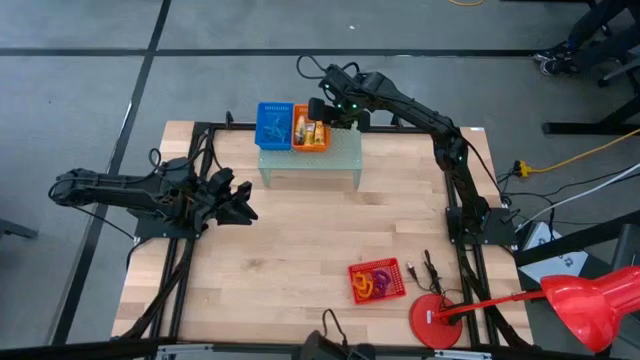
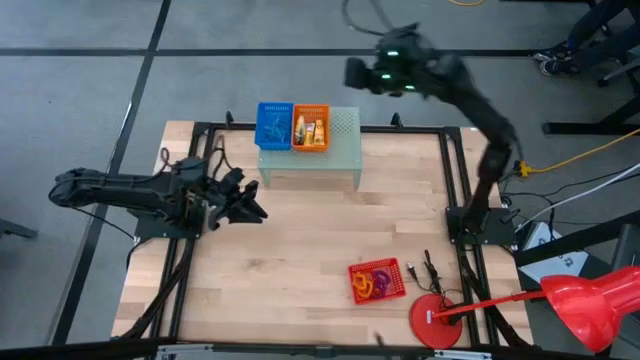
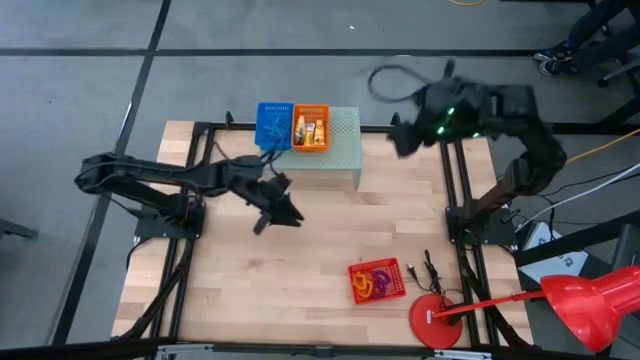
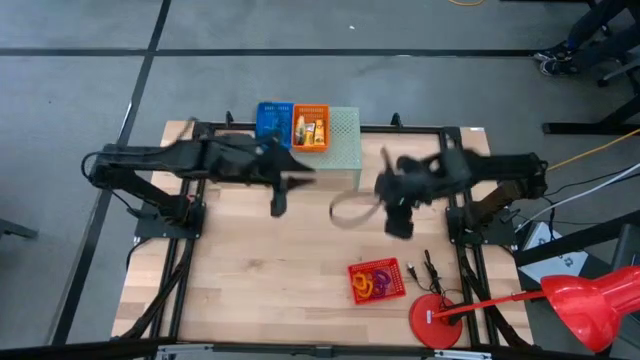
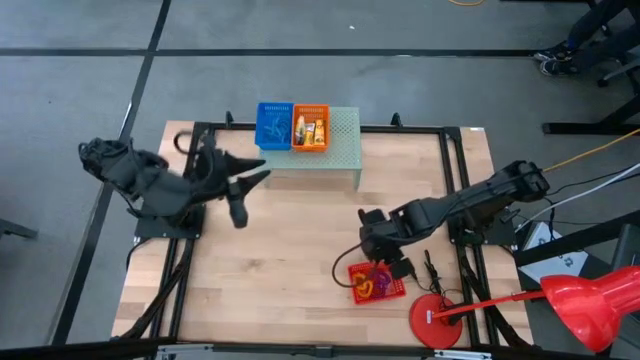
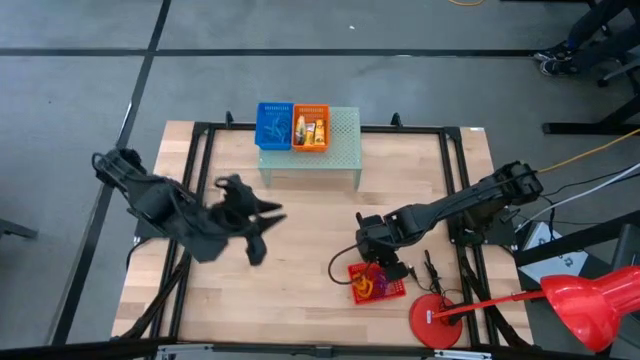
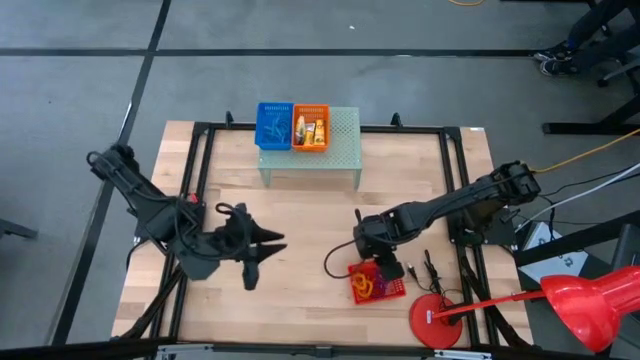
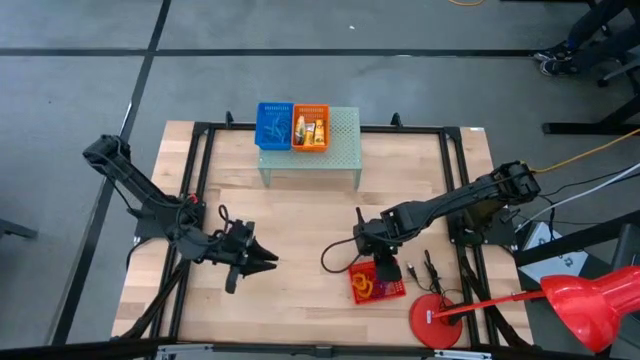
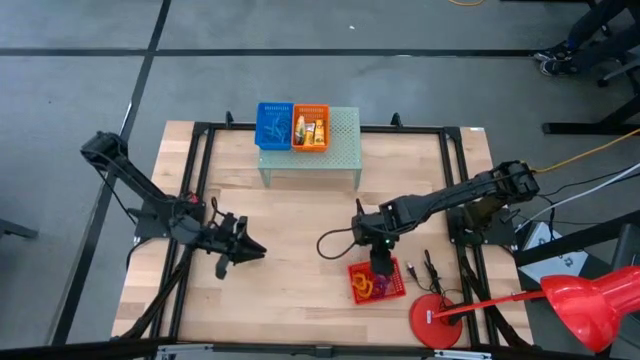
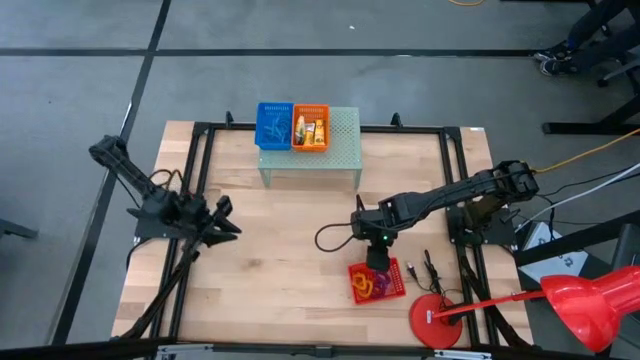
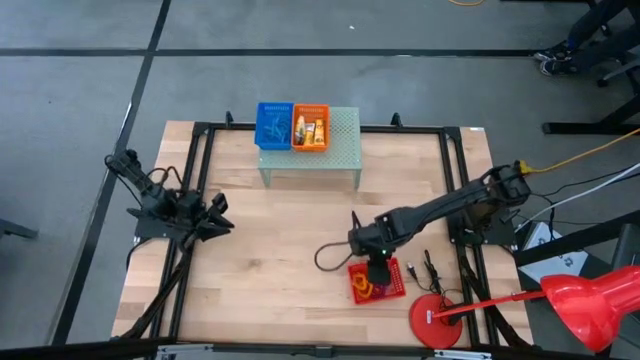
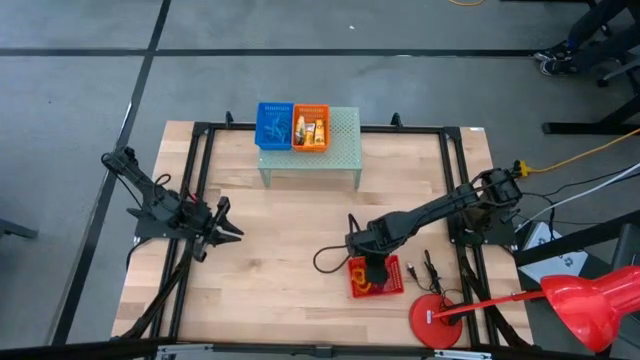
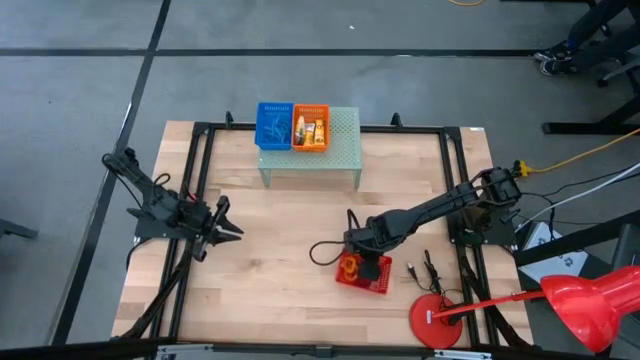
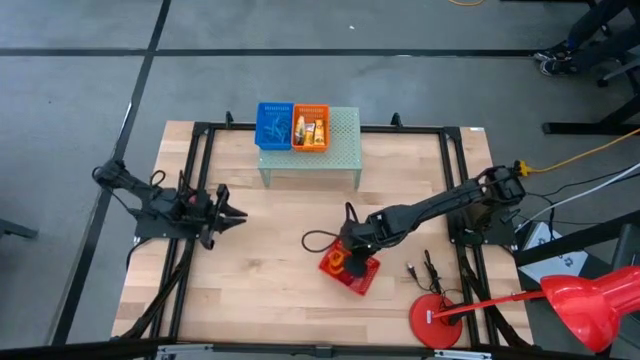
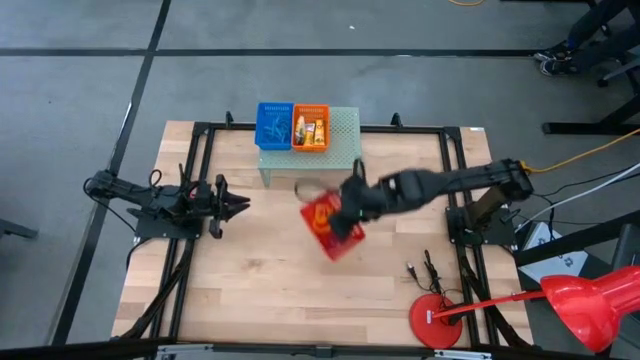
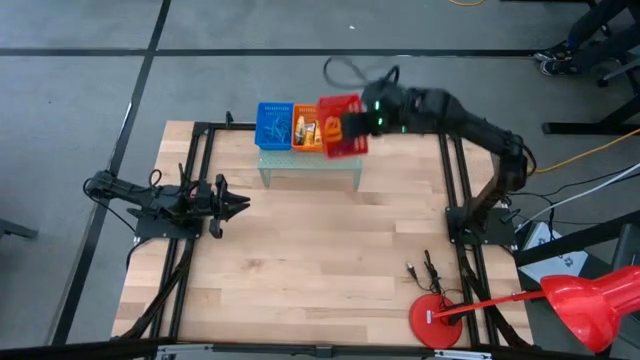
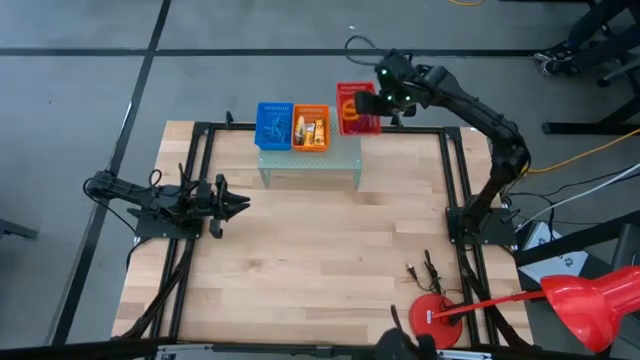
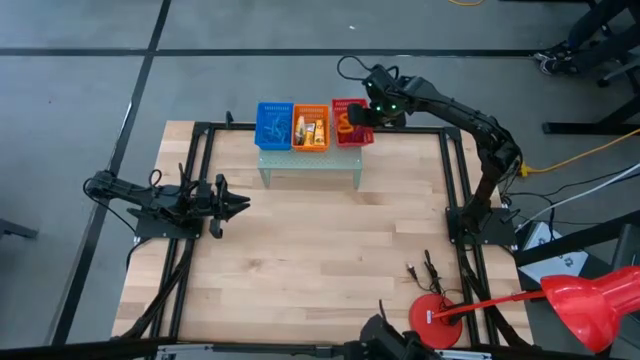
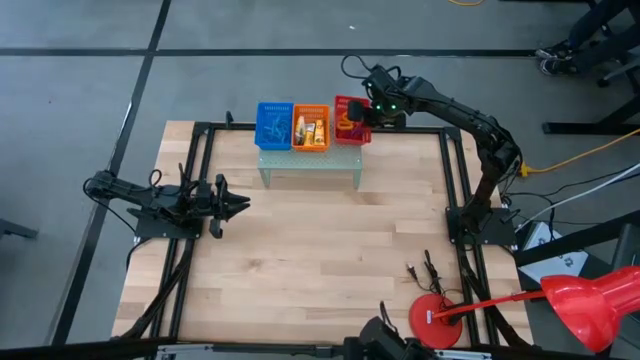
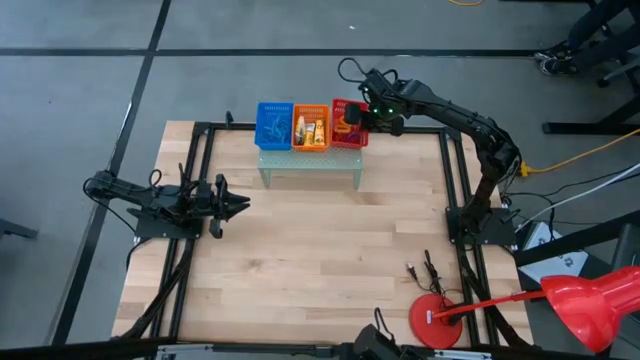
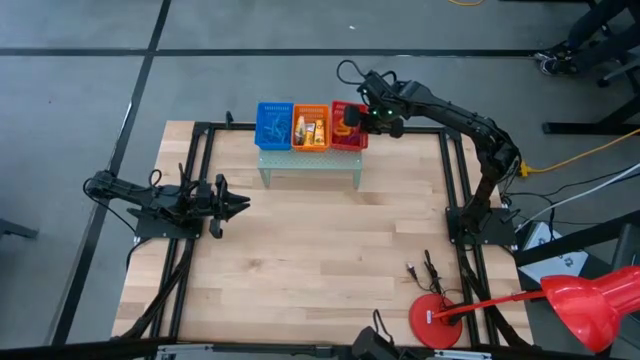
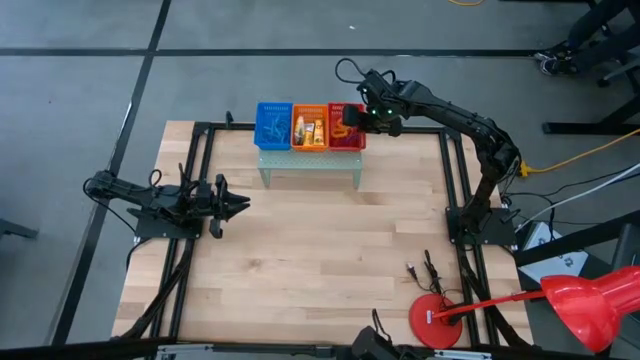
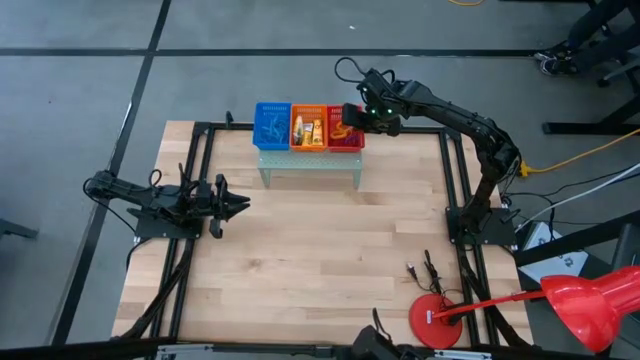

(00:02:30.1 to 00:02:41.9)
Task: Pick & Place Office Desk Supplies
Put the red bin with spring keychains on the shelf

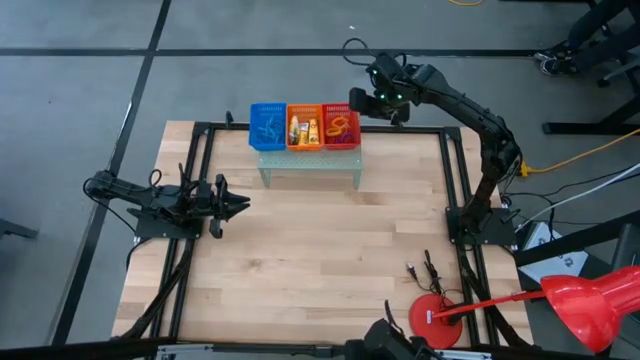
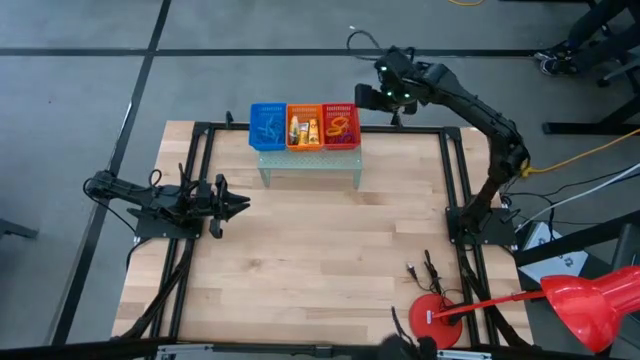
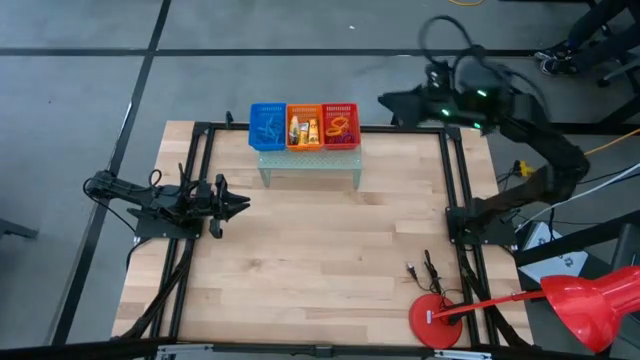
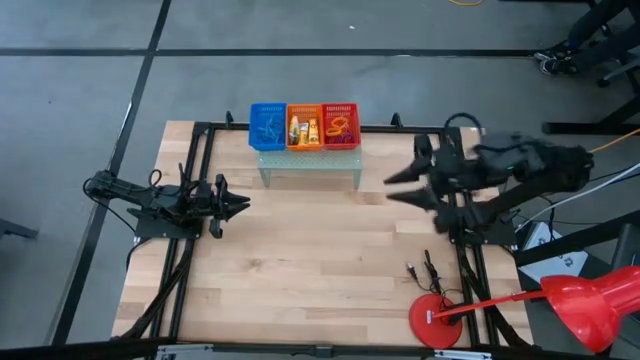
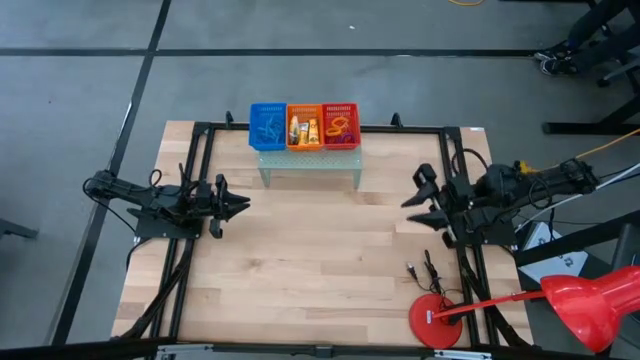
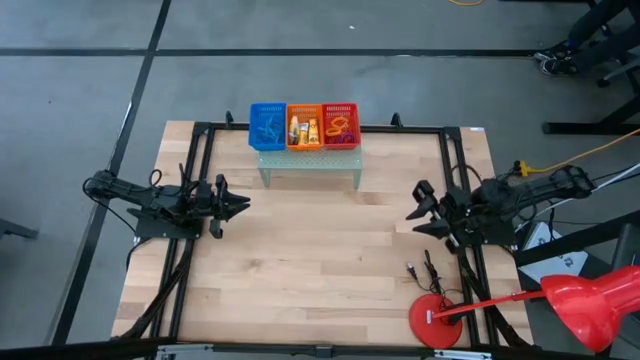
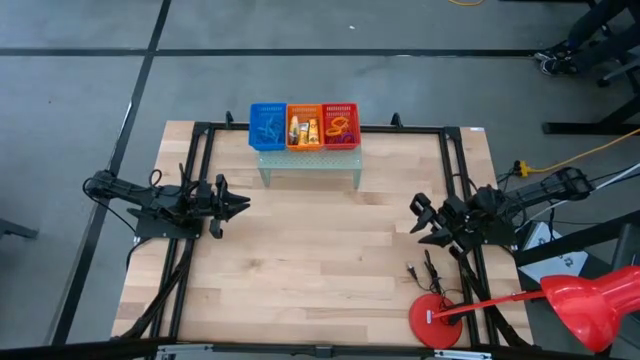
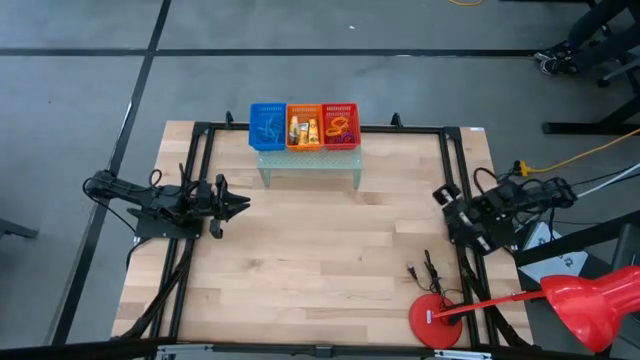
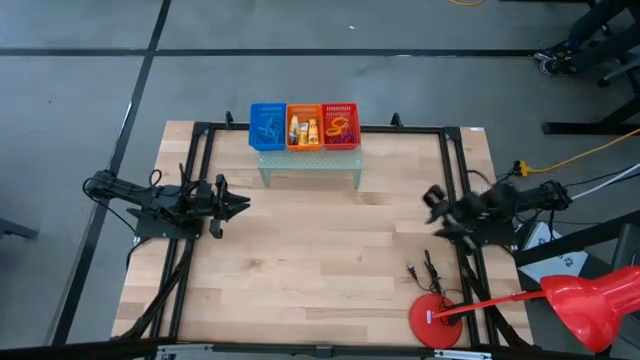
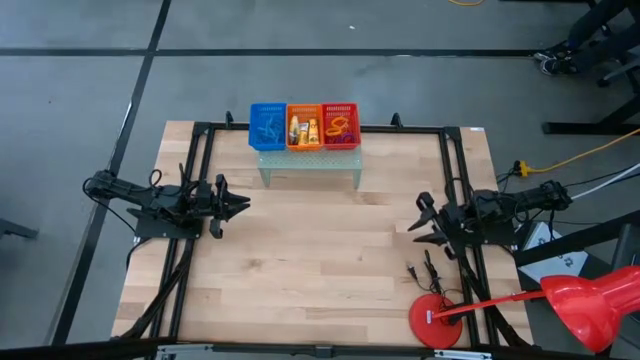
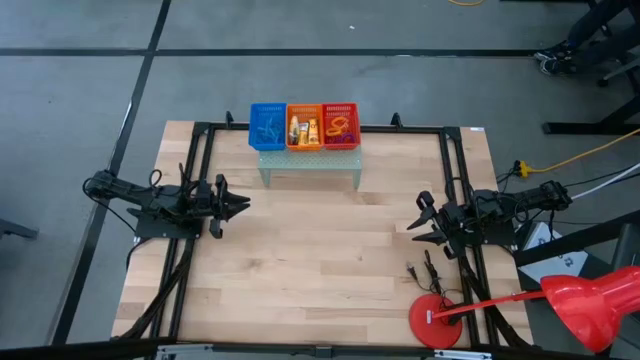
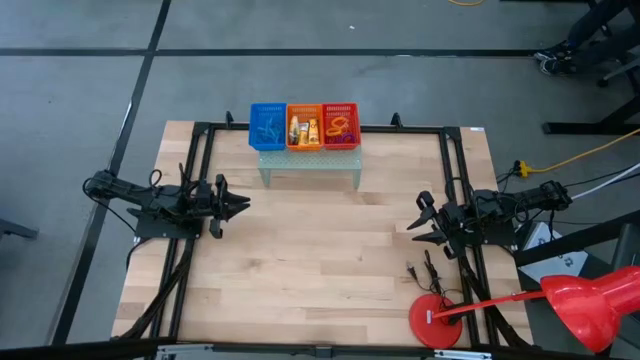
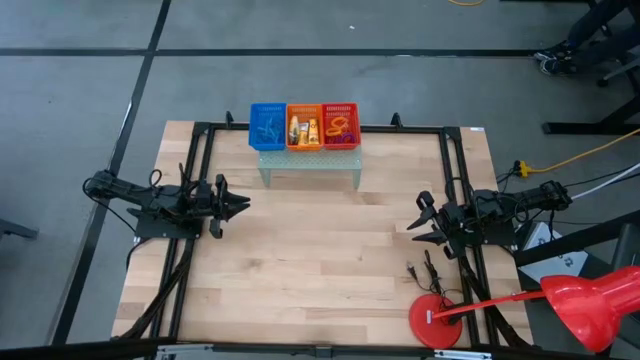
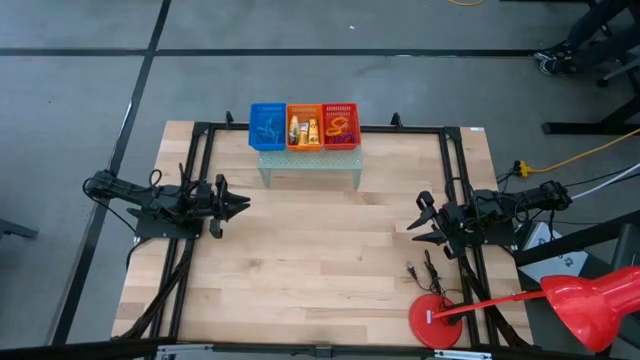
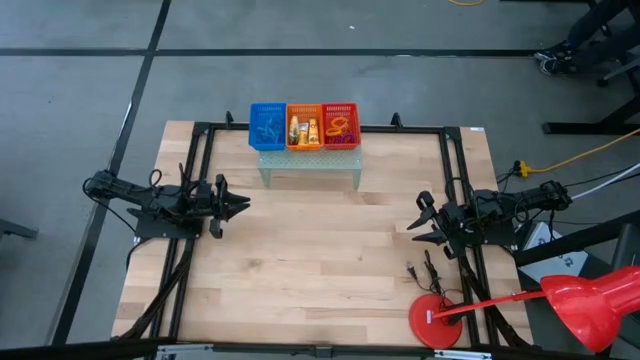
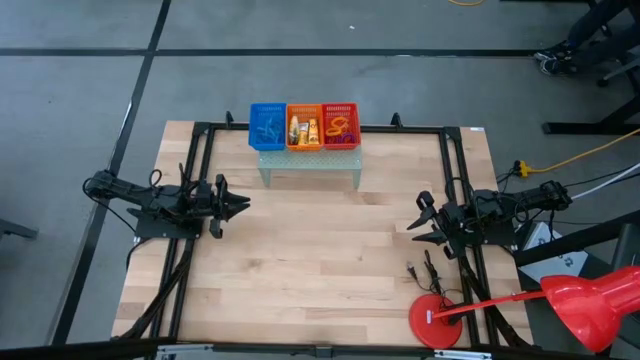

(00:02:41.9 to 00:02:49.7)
Return to Home position

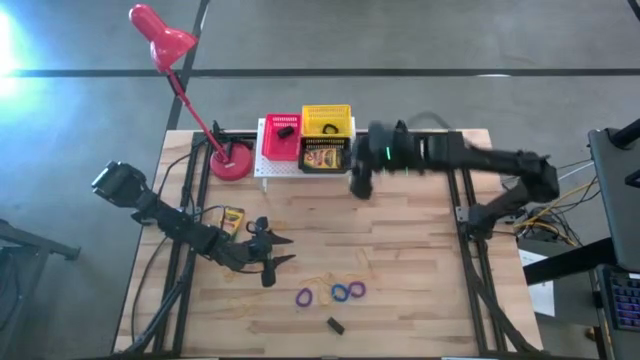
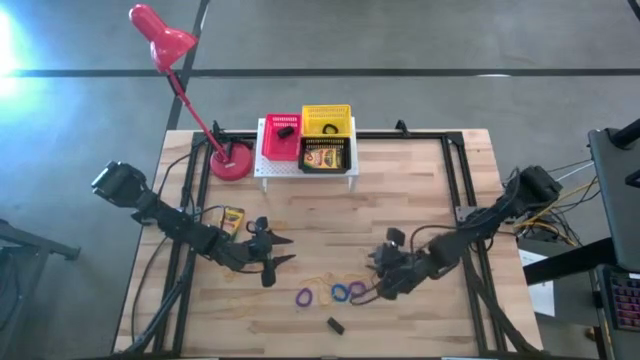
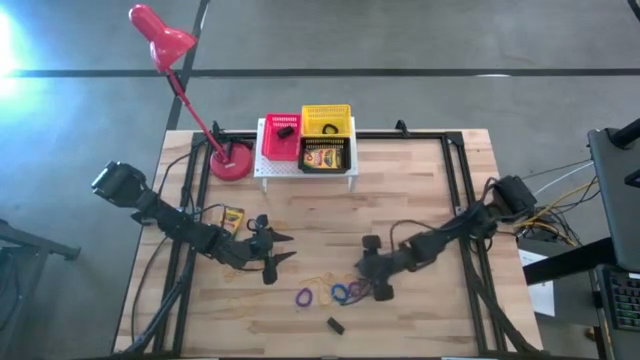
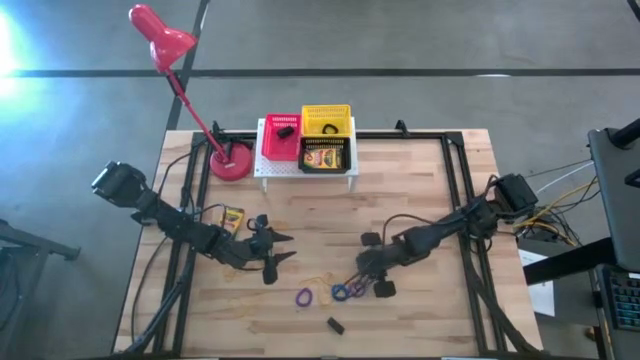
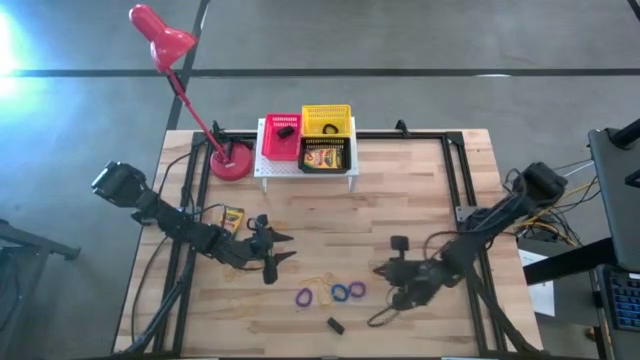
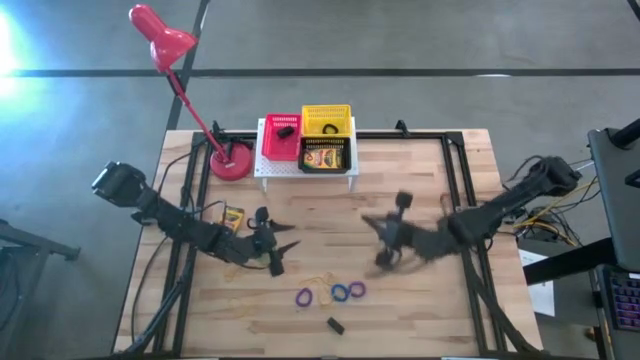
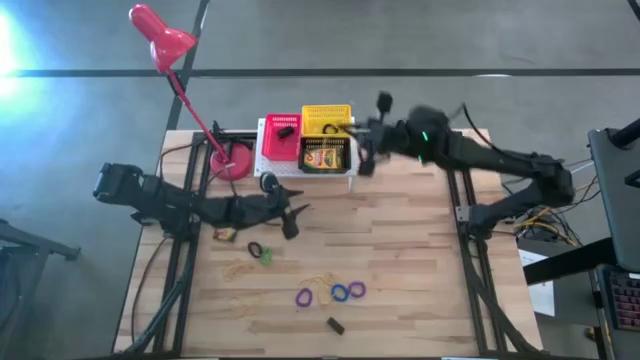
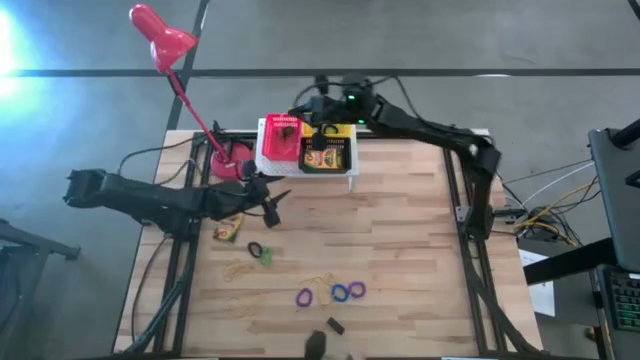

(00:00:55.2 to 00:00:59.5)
Task: Pick & Place Office Desk Supplies
Put the yellow rubber band into the red bin on the shelf
